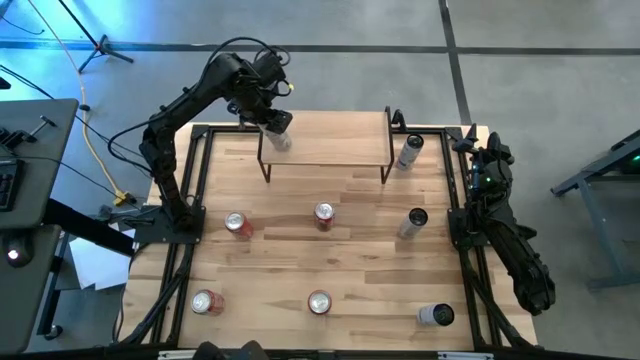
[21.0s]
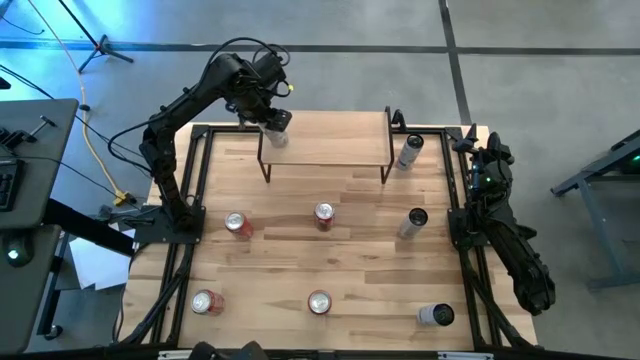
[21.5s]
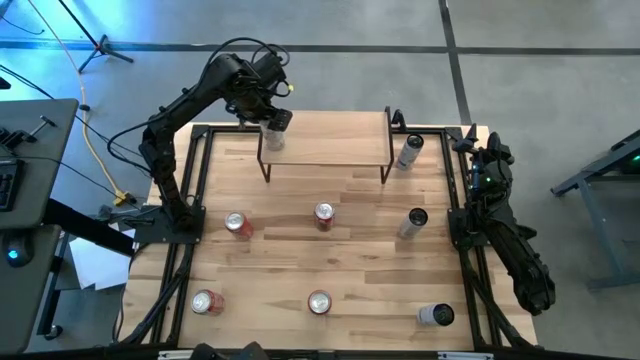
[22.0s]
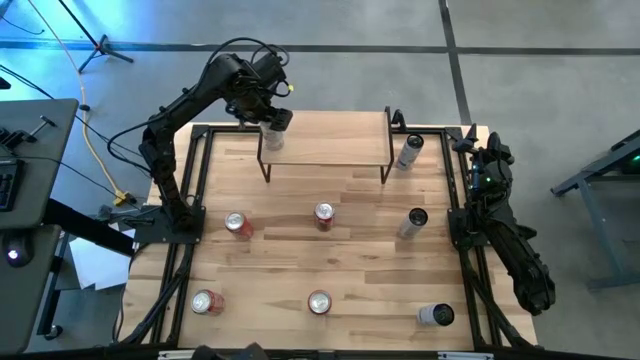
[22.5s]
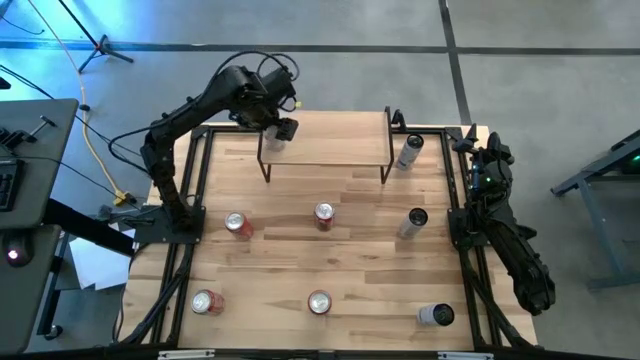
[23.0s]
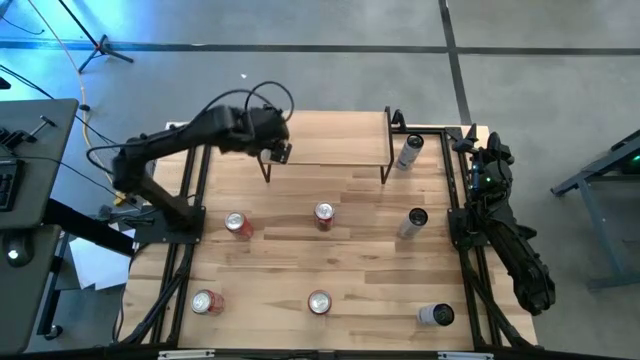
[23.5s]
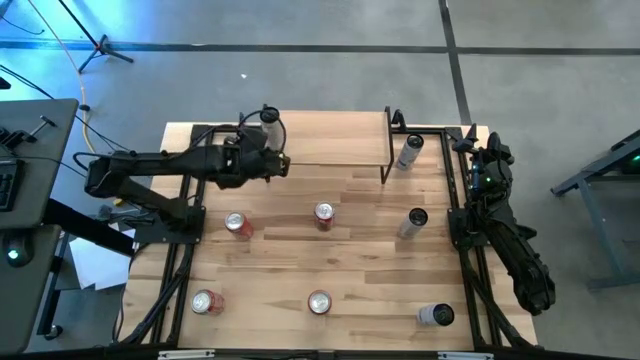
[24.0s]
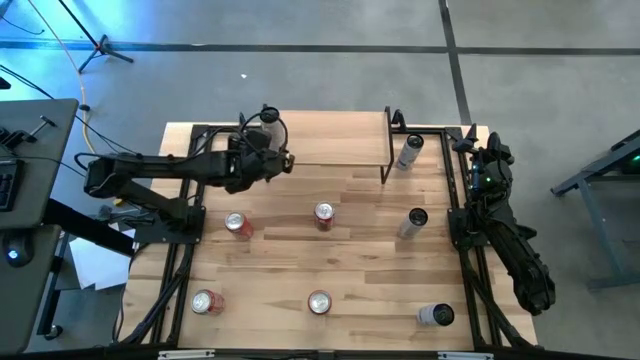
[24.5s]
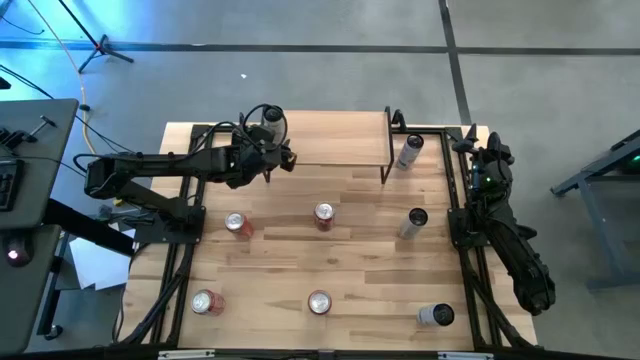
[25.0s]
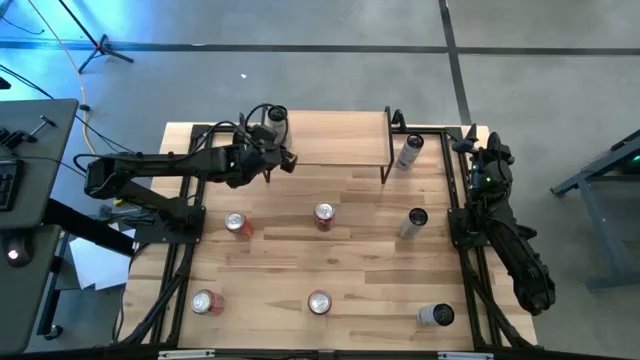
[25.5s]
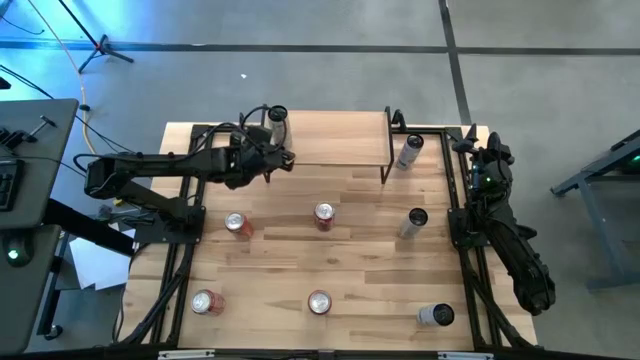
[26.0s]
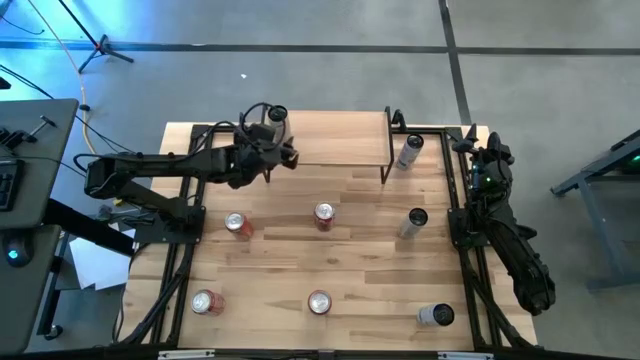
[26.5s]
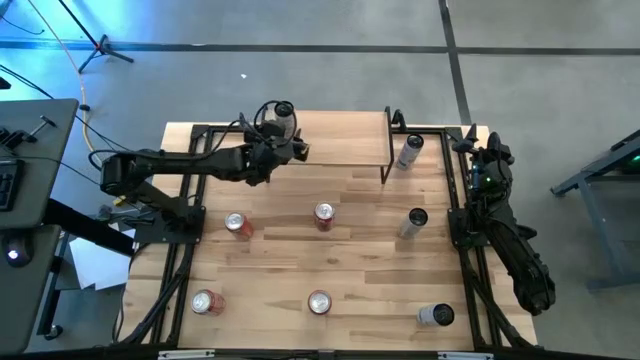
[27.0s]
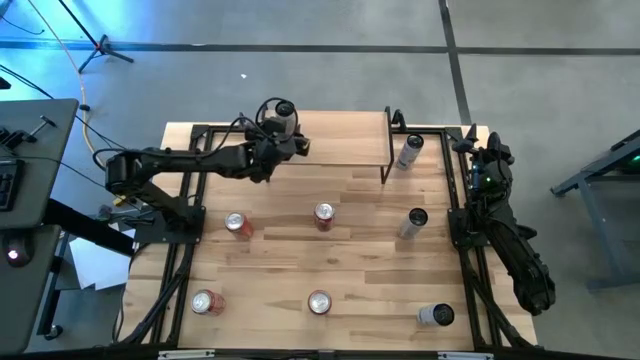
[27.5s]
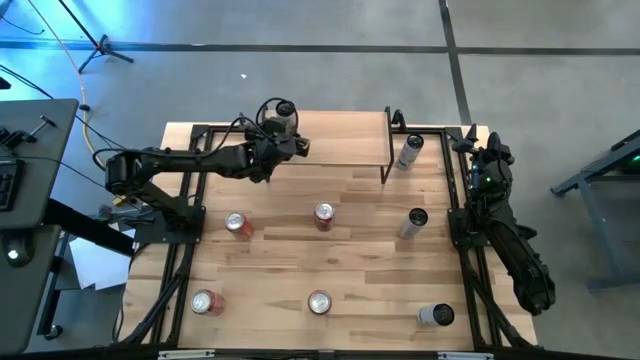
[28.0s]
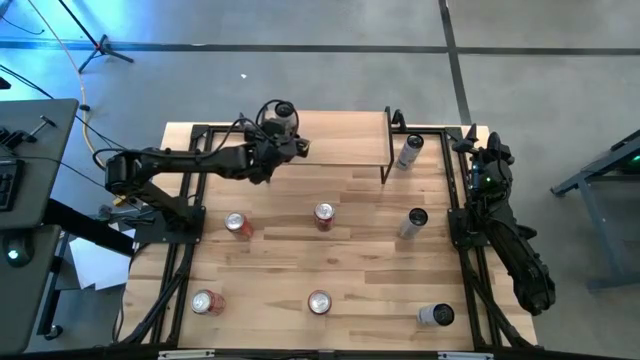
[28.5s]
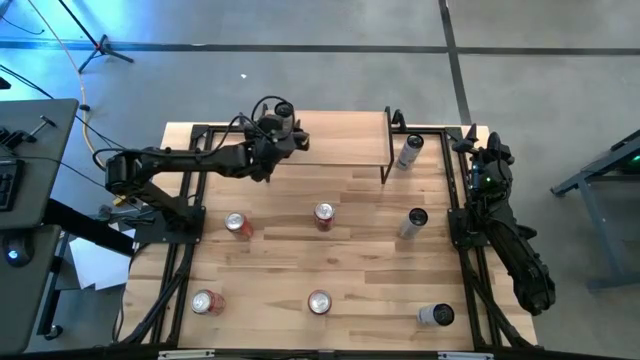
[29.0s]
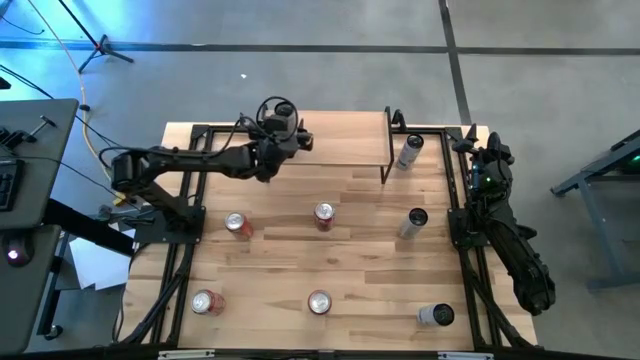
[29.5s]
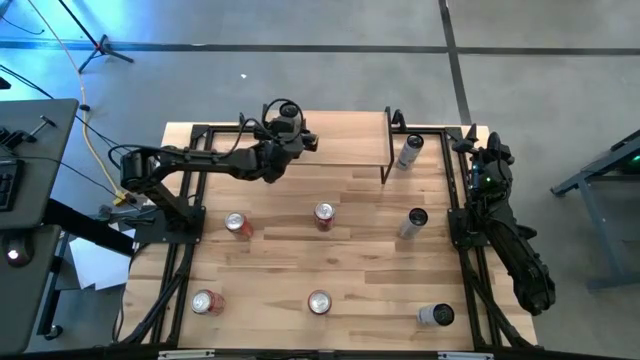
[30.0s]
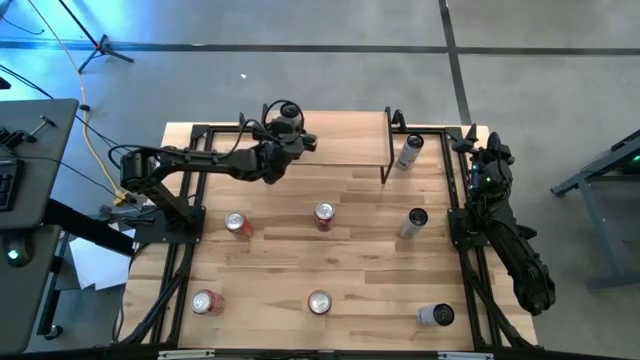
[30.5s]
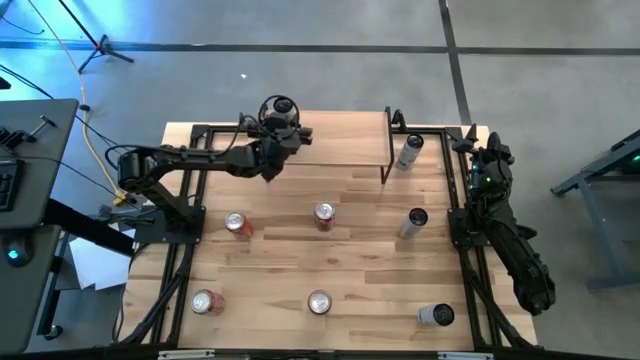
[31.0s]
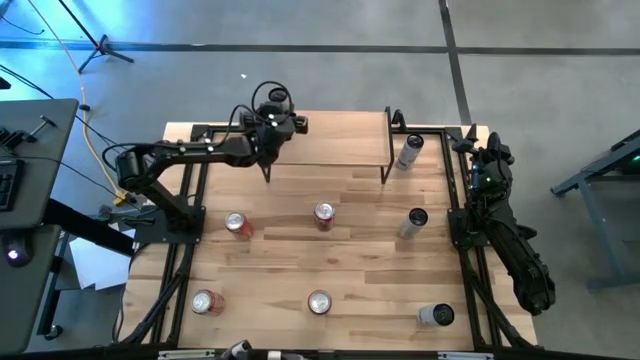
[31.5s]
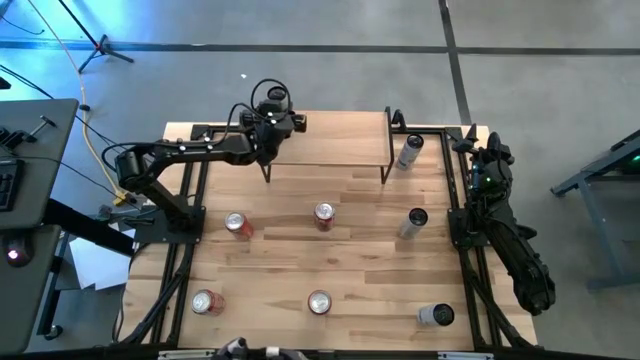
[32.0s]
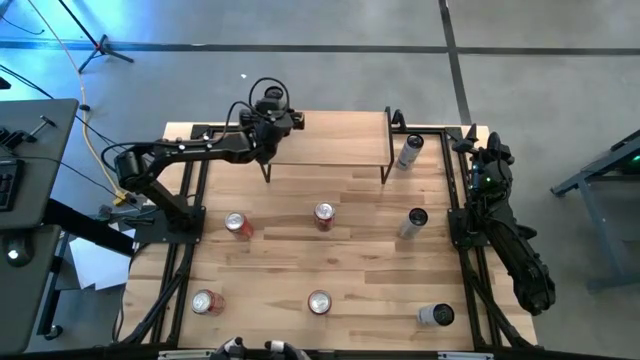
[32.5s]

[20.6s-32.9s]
Task: Place canned beverage on shelf
Put the white and yellow soda can on the shelf

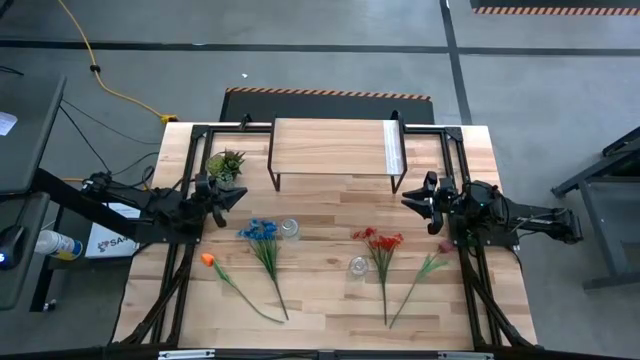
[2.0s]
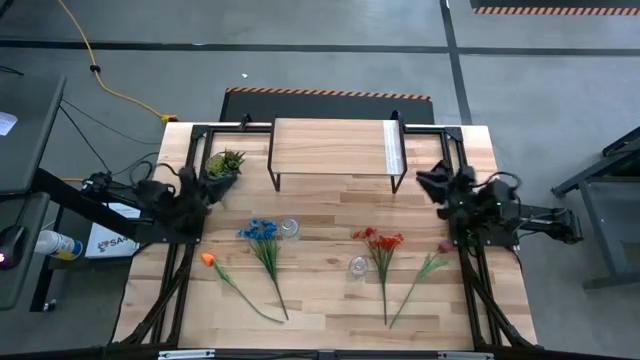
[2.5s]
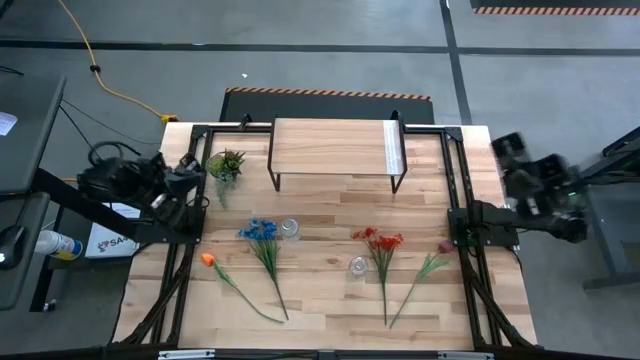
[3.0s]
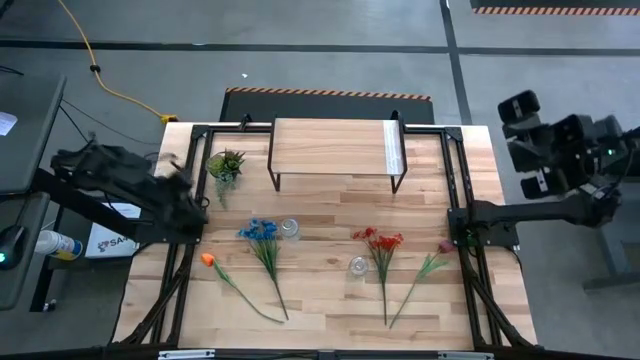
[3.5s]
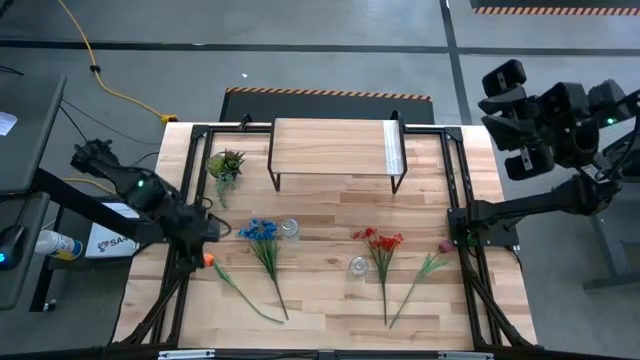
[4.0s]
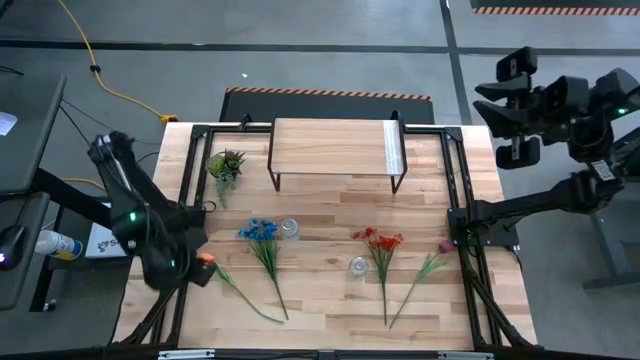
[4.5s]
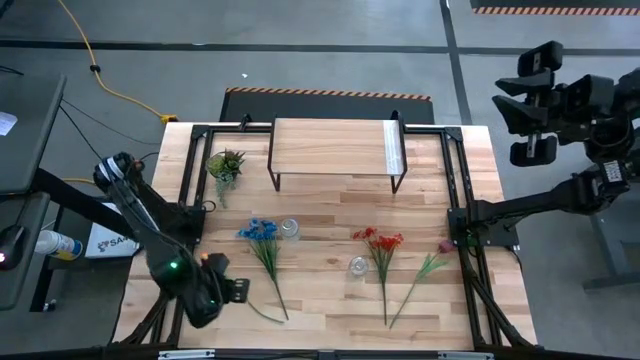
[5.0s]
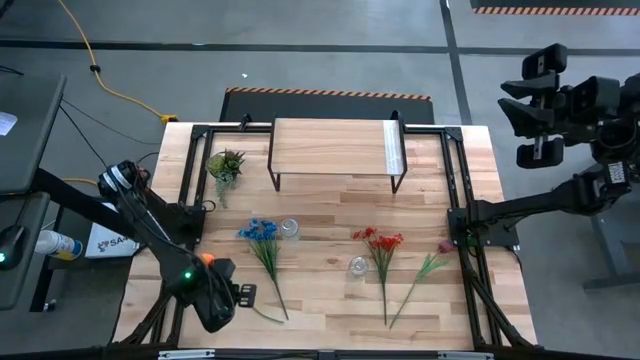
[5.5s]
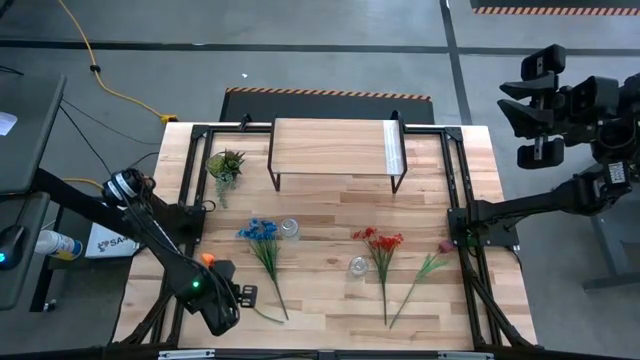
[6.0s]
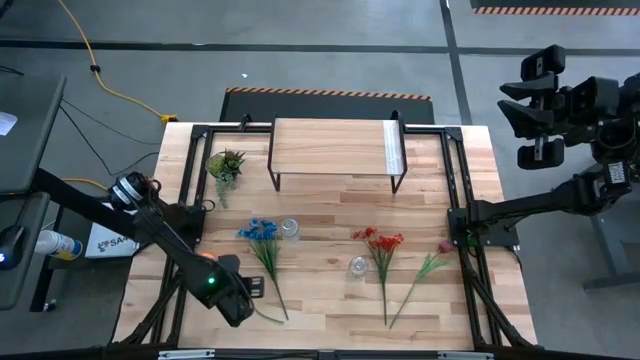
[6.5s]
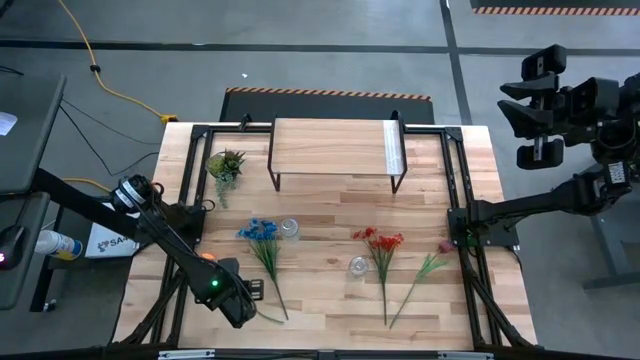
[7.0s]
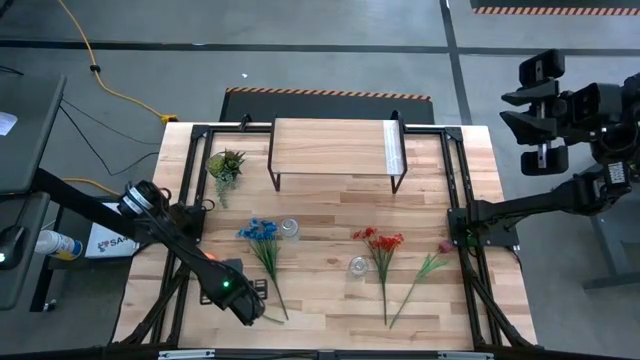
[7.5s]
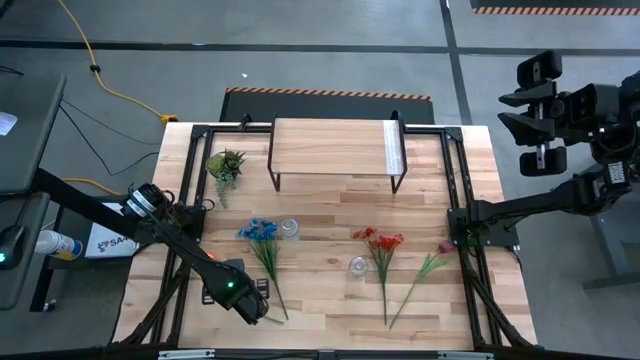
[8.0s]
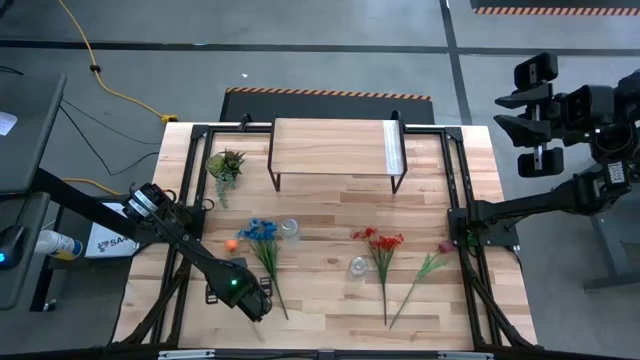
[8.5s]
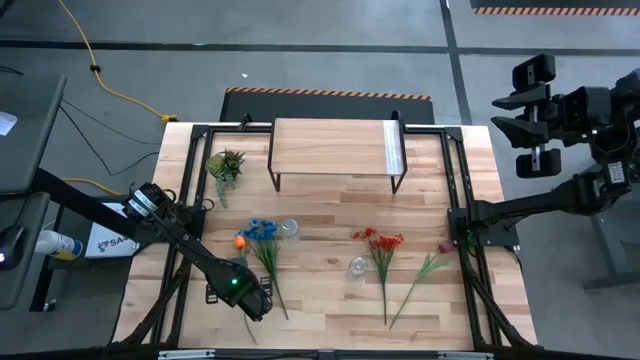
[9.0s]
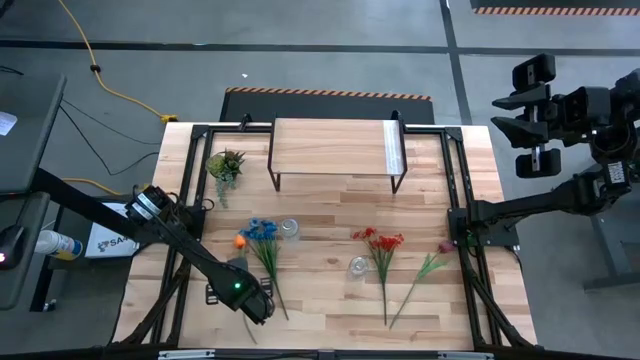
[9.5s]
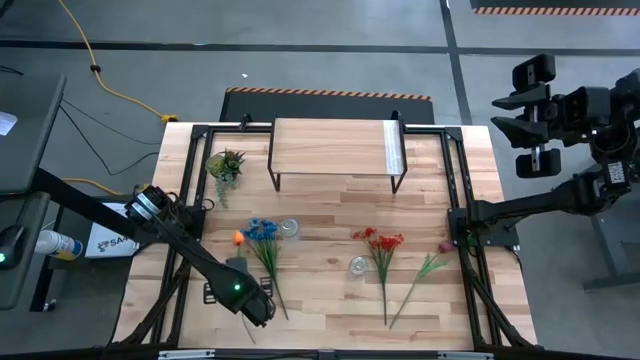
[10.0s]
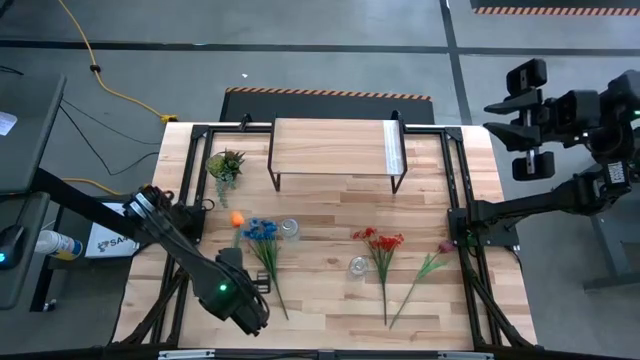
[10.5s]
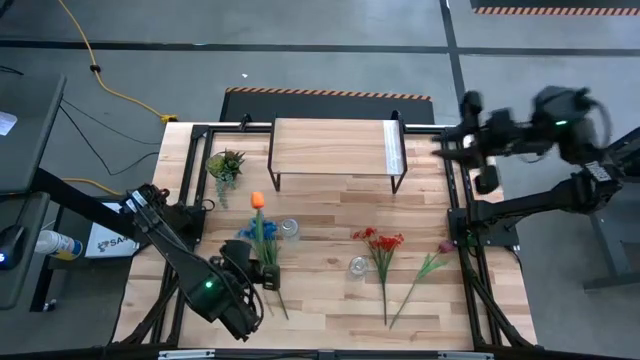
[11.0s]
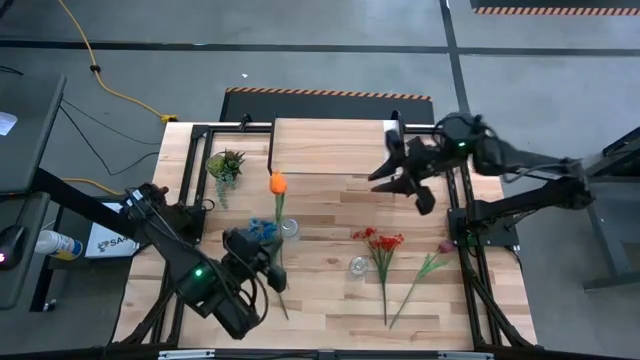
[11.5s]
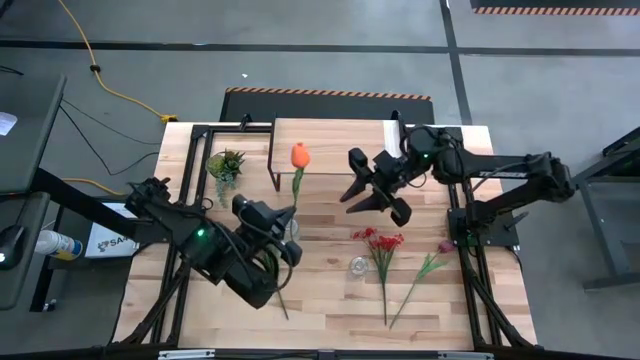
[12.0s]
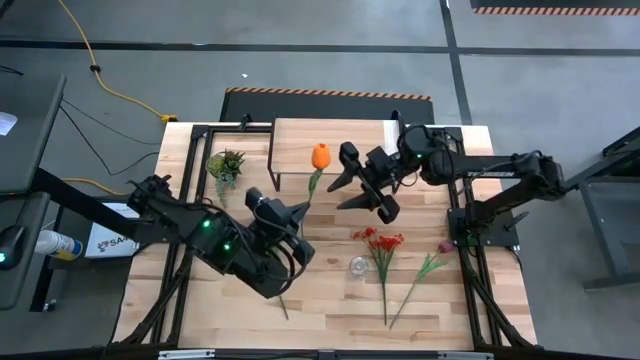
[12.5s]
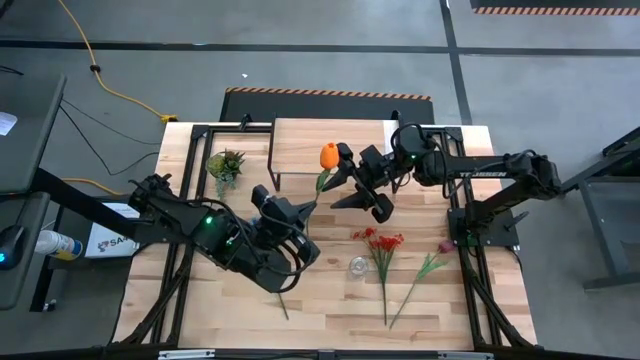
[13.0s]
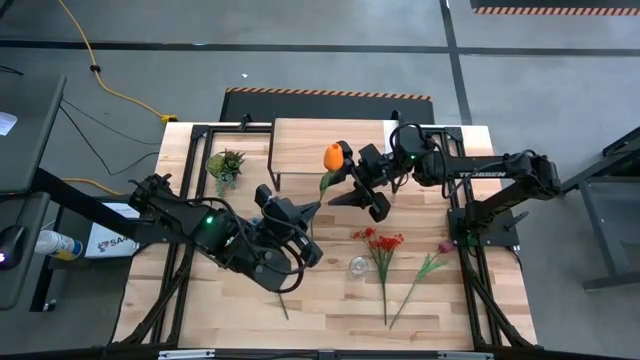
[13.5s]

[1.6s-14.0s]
Task: Pick and place flowers into a vace then onto a shelf
Put the orange flower into the right transparent vase
